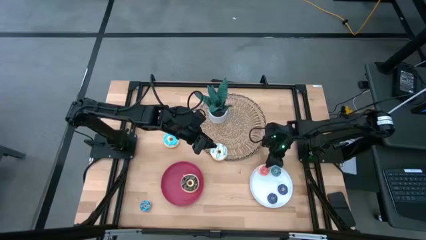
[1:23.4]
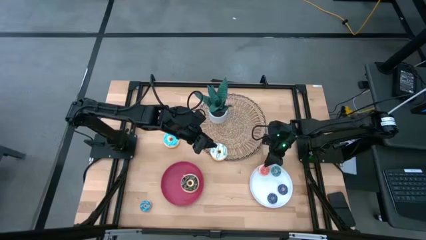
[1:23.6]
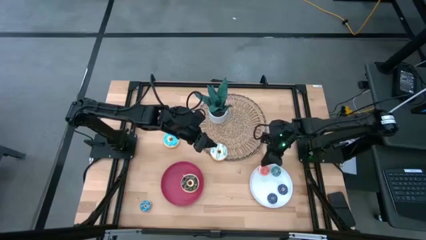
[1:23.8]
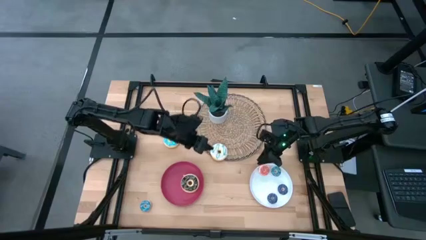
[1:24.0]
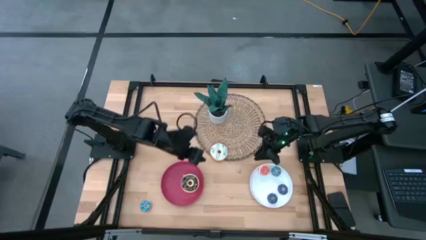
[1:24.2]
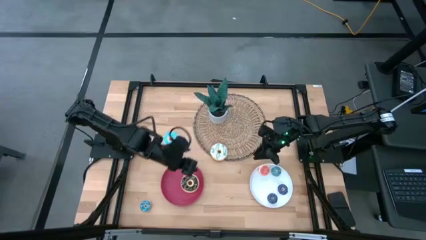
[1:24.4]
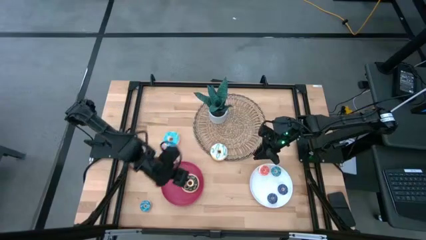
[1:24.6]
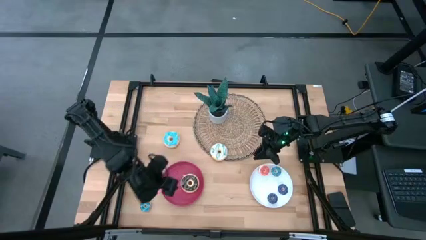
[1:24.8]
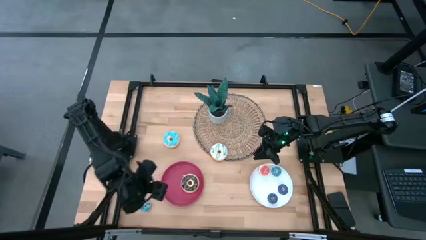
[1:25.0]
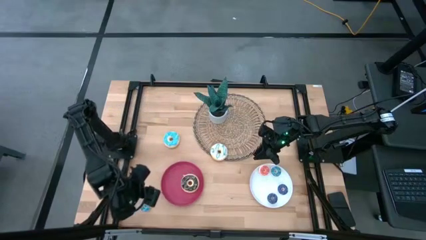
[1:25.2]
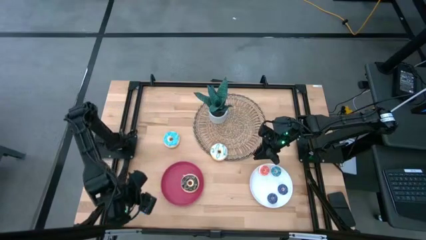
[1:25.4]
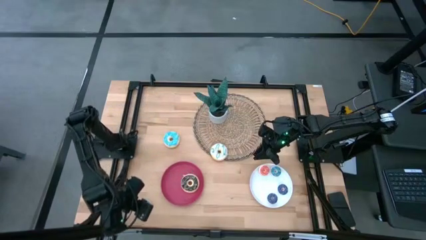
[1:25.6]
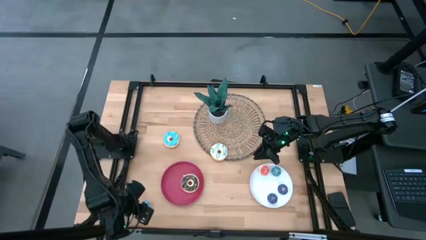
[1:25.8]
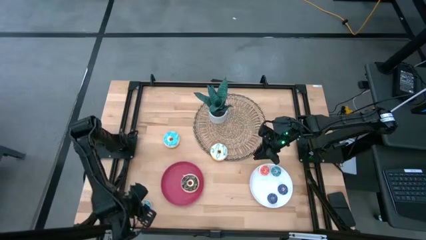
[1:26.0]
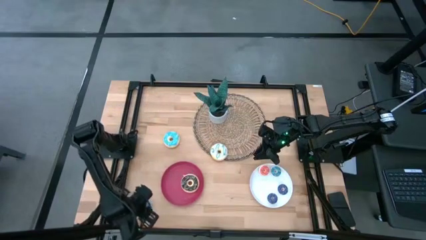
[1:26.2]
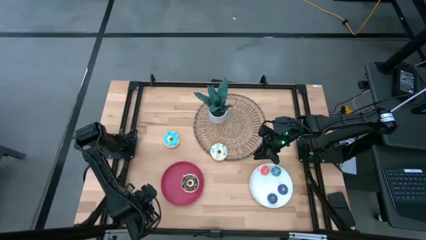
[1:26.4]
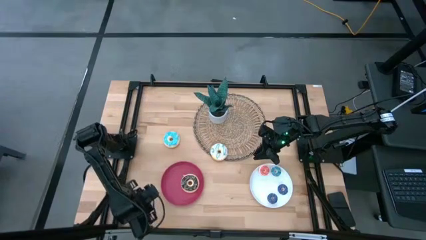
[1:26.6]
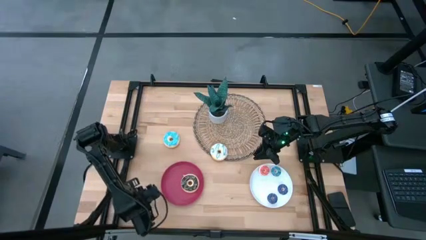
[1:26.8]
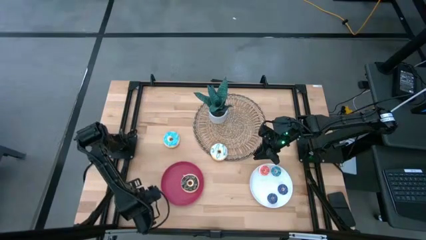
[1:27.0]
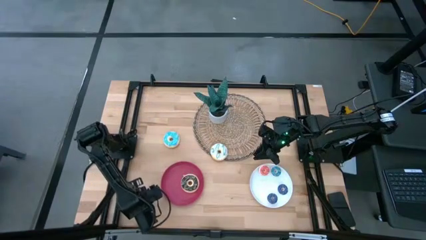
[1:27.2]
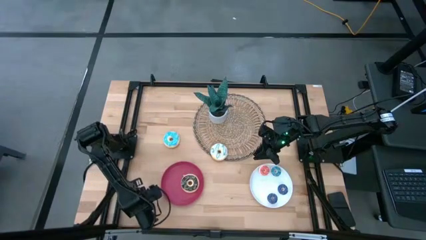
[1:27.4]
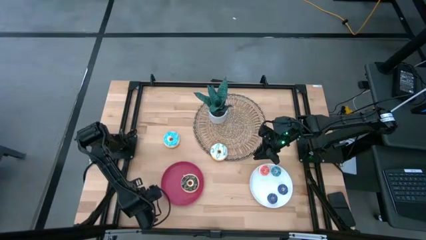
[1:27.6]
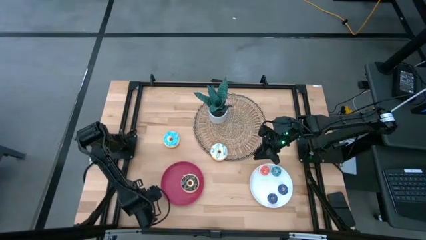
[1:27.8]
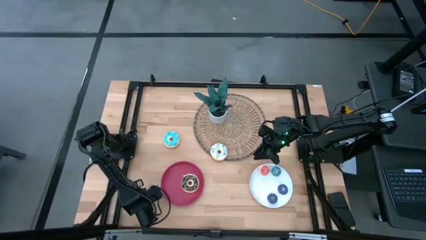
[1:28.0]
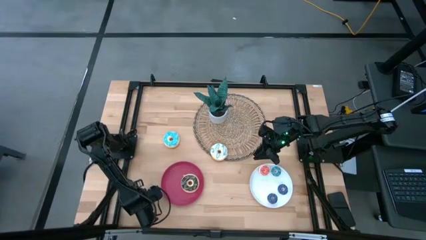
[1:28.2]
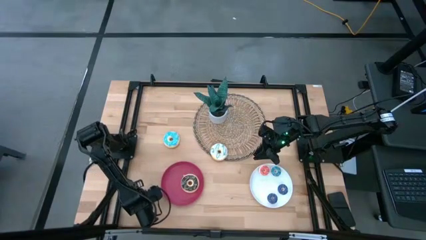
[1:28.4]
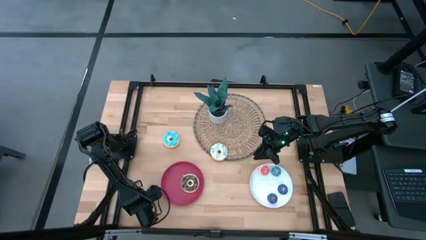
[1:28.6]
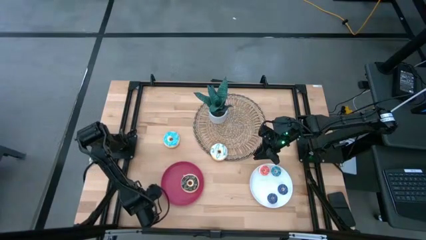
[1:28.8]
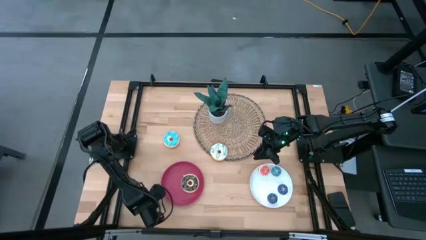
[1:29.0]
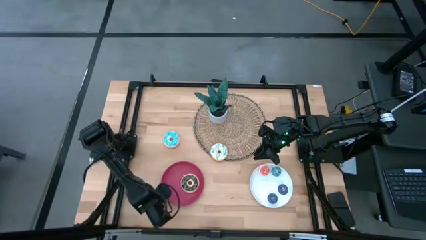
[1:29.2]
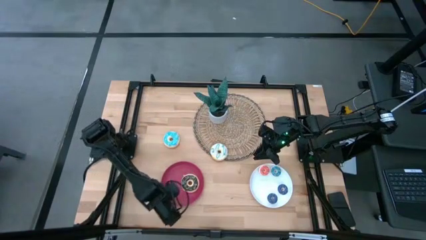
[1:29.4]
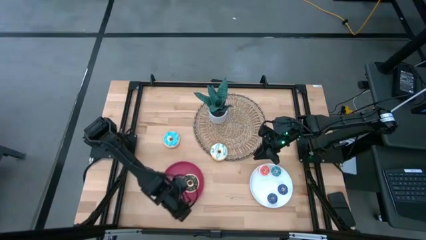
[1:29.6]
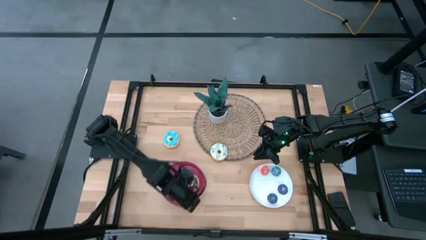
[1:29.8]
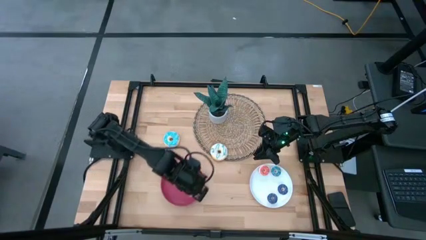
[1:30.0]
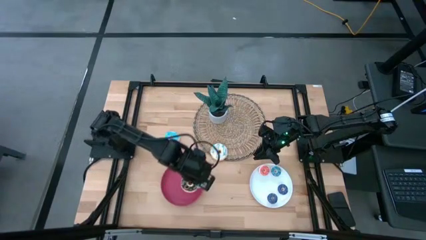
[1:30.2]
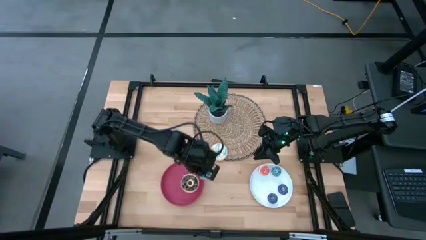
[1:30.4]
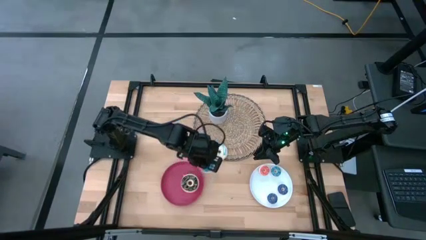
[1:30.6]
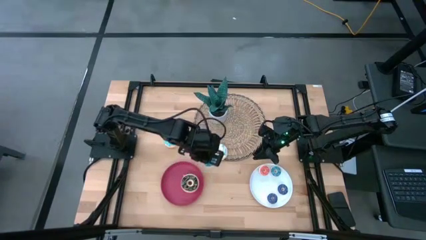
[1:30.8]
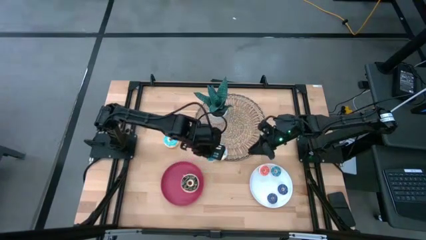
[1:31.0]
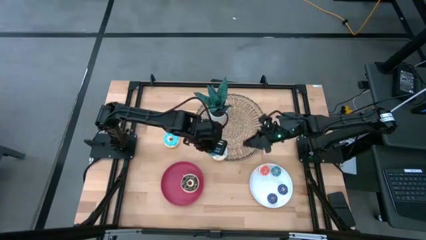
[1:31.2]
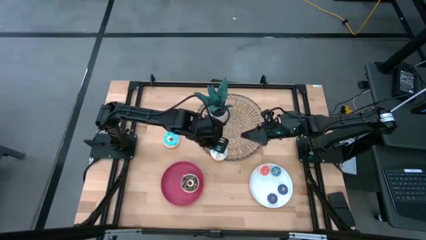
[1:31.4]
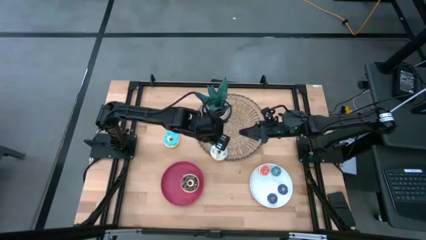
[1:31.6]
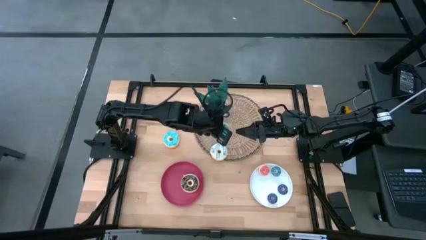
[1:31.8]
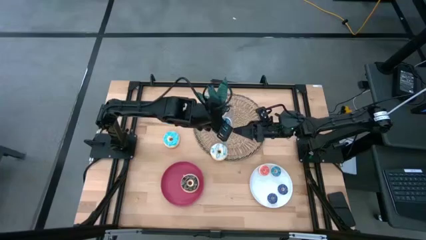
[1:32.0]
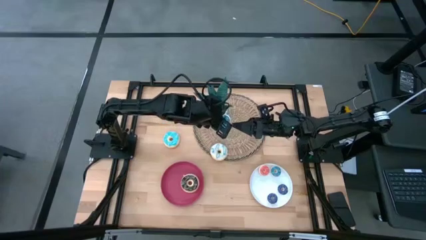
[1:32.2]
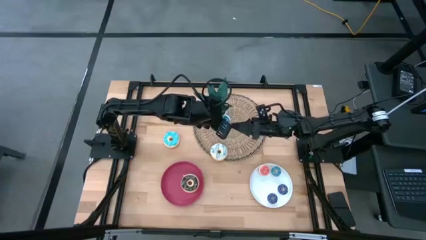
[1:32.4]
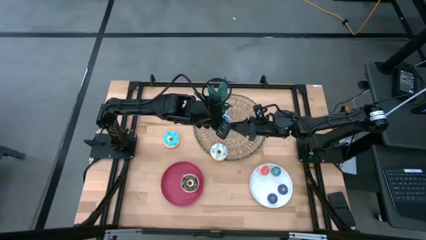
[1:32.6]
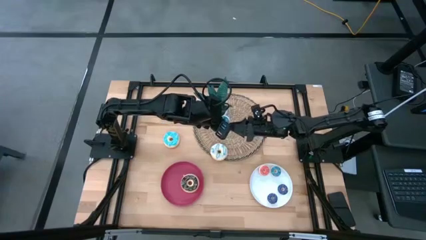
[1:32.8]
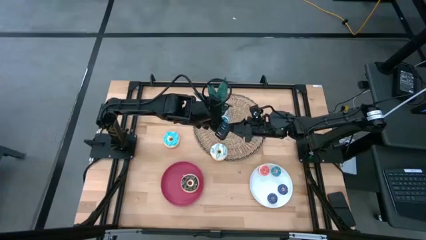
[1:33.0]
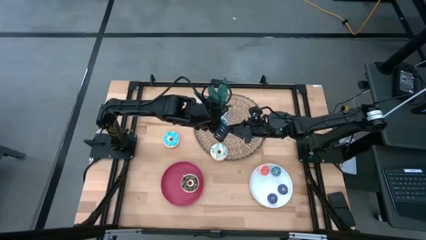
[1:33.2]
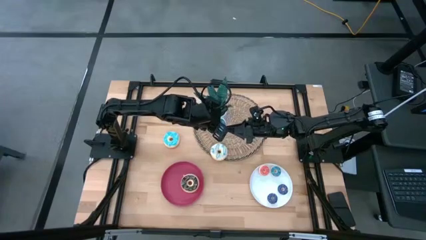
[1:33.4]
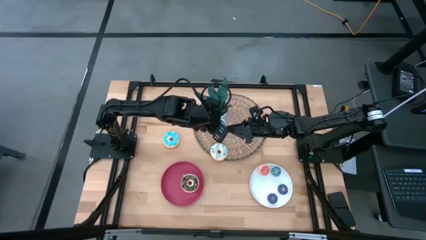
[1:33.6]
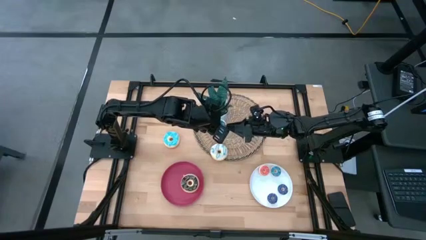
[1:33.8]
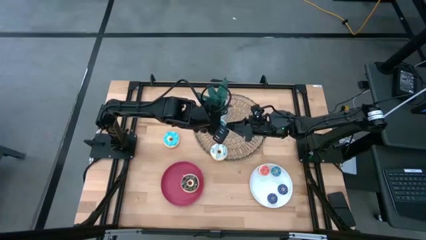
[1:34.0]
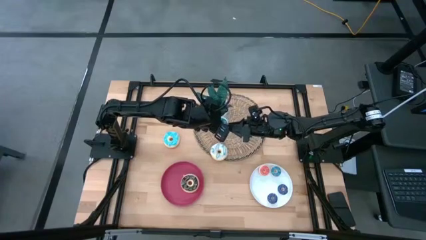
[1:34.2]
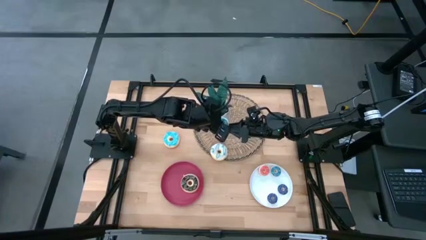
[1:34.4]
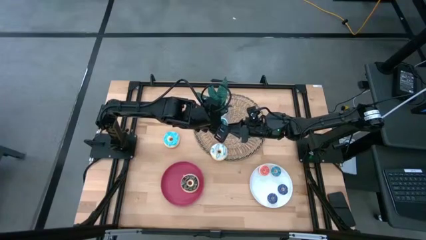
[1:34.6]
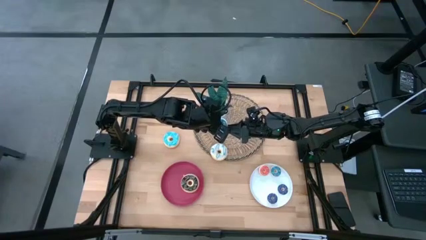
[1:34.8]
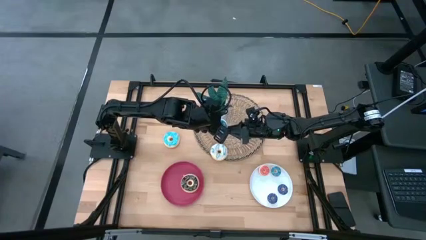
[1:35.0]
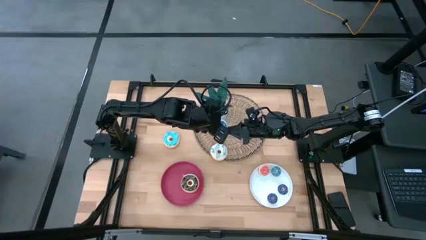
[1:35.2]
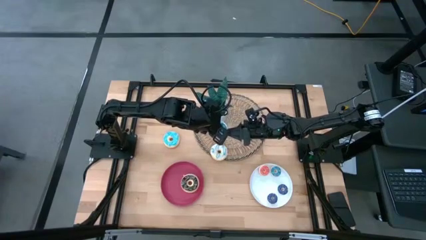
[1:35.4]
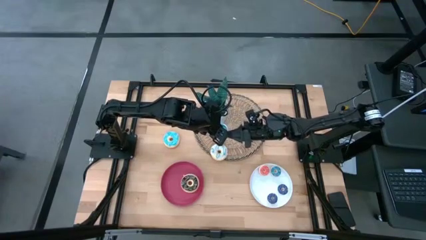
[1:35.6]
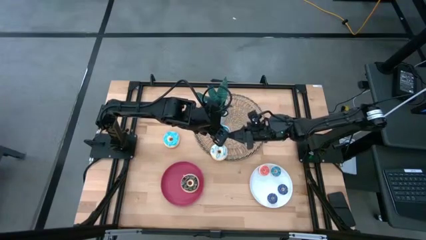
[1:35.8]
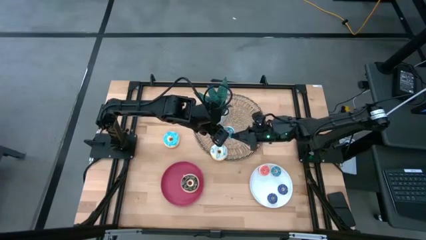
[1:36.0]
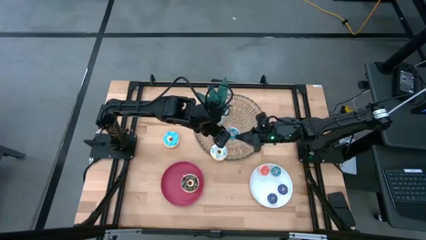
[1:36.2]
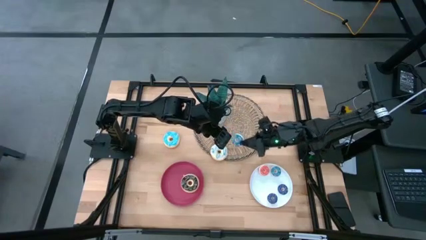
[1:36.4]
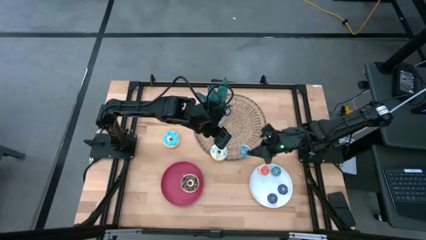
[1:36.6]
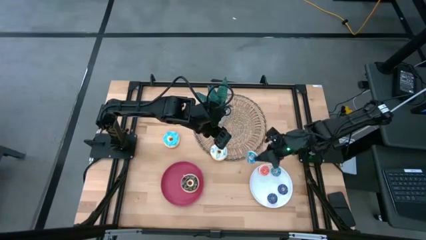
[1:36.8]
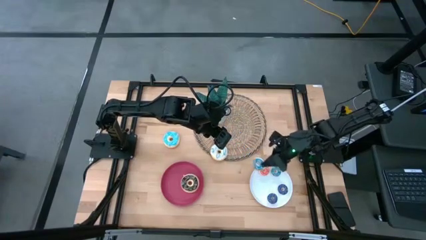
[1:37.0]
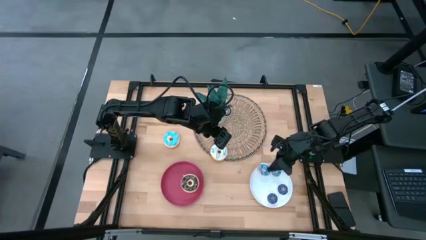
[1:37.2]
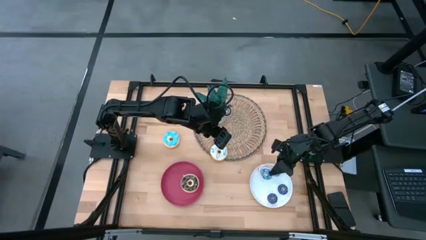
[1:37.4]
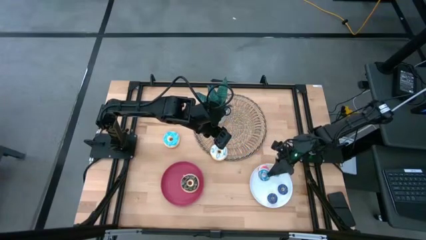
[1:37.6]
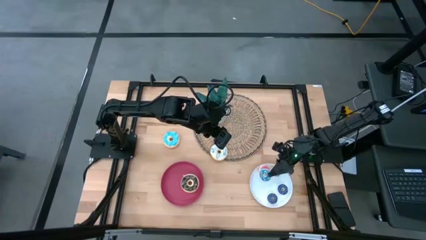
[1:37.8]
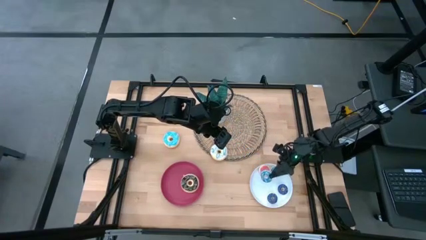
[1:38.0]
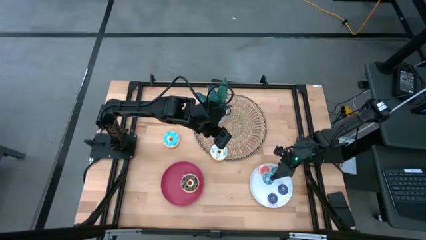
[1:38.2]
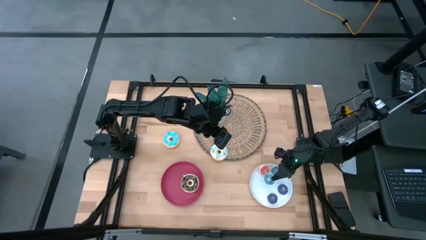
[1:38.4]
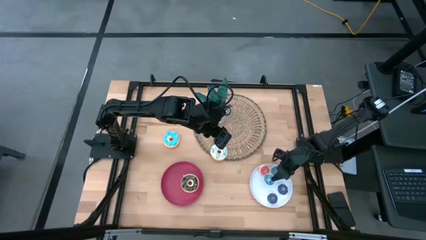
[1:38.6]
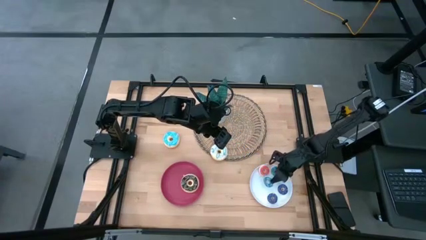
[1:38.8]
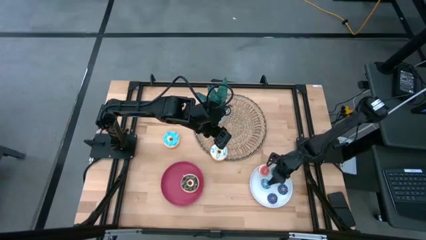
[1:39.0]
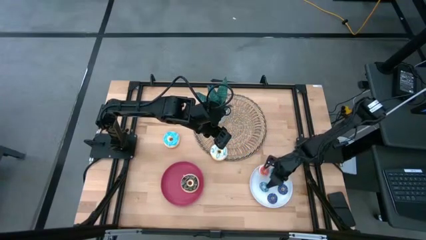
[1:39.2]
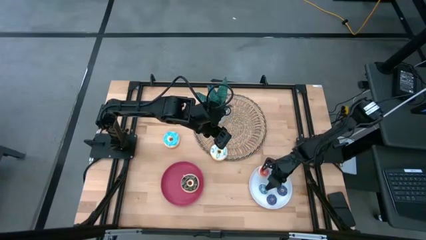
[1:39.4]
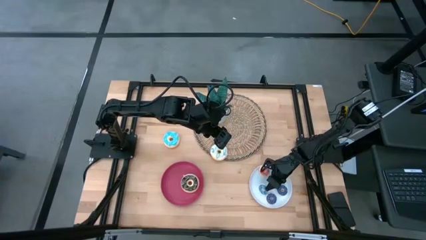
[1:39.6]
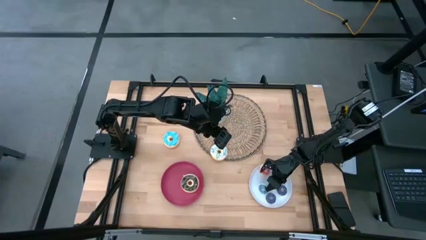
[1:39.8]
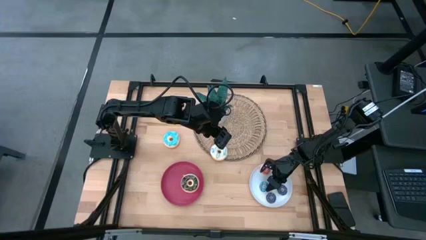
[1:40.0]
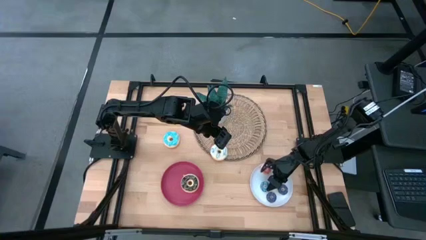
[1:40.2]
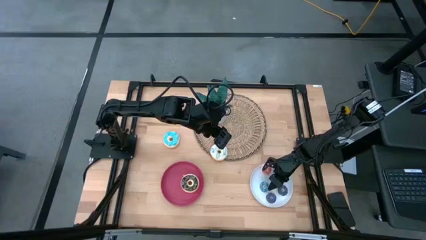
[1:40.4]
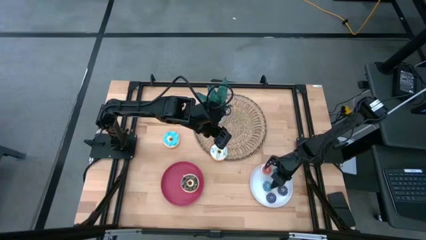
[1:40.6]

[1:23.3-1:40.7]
Task: Pick & Place donuts
Put the blue donut on the white plate
